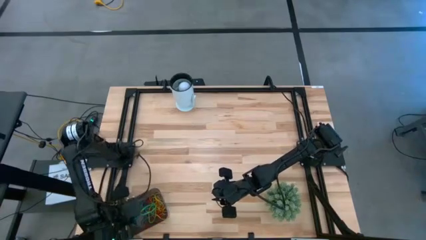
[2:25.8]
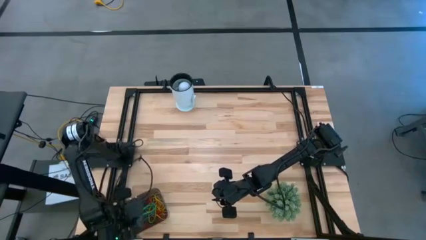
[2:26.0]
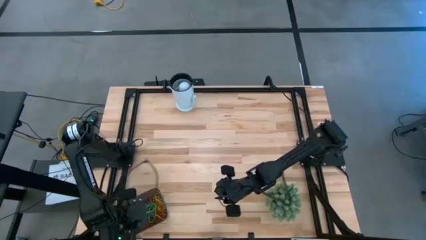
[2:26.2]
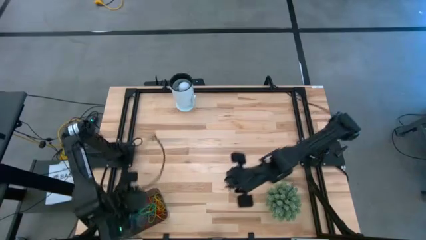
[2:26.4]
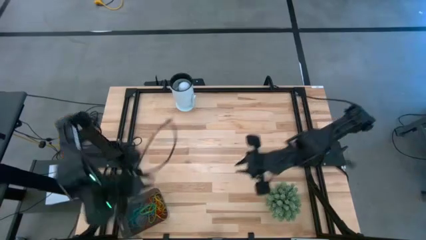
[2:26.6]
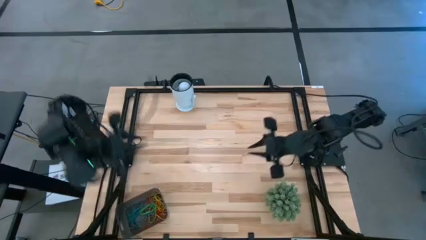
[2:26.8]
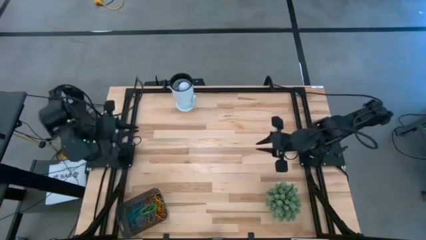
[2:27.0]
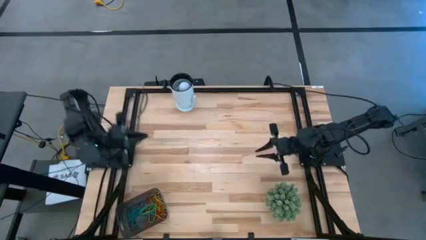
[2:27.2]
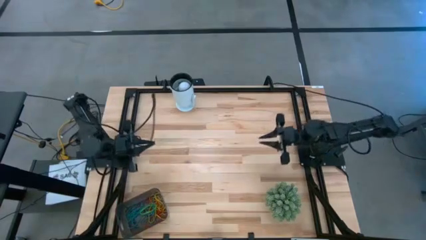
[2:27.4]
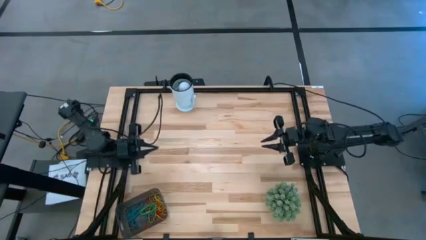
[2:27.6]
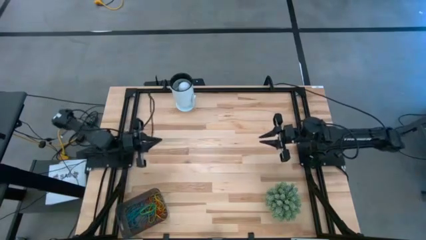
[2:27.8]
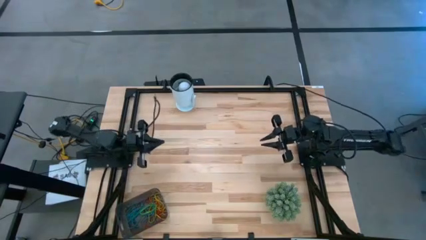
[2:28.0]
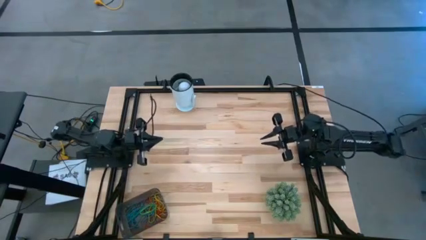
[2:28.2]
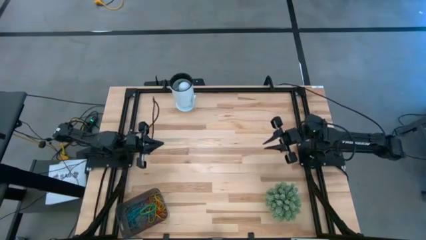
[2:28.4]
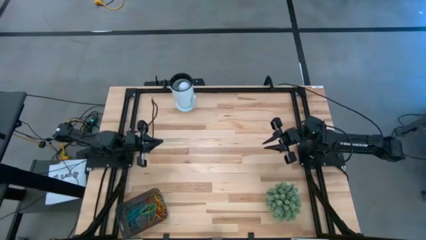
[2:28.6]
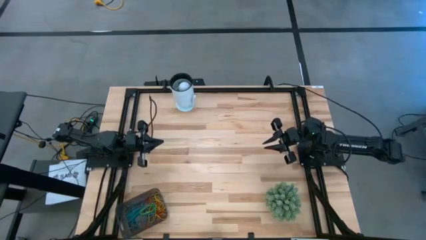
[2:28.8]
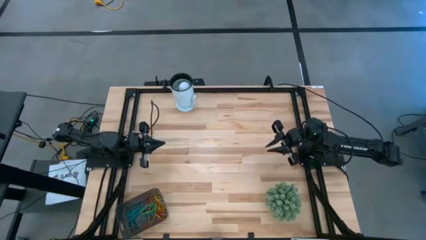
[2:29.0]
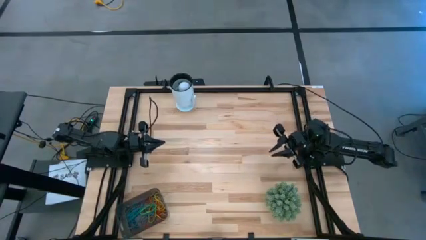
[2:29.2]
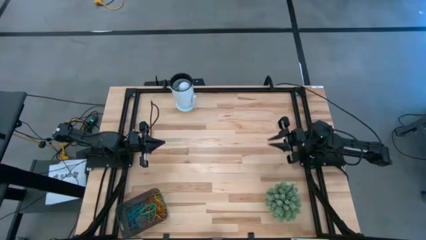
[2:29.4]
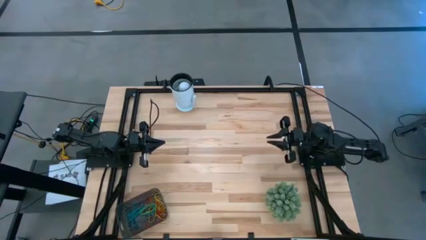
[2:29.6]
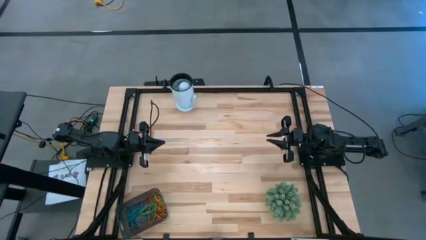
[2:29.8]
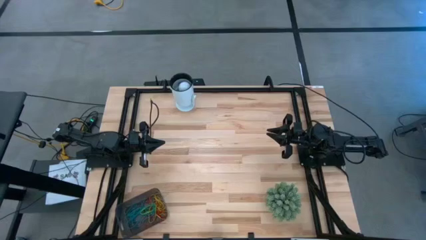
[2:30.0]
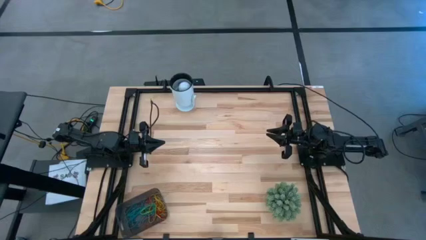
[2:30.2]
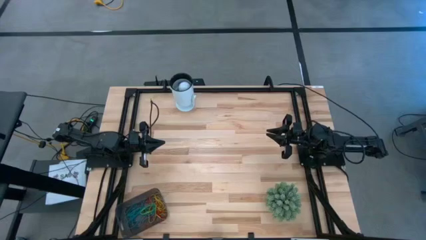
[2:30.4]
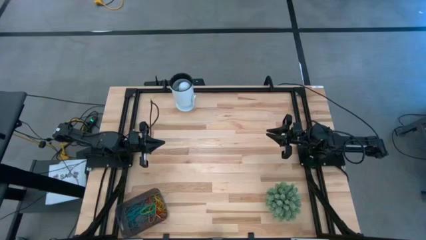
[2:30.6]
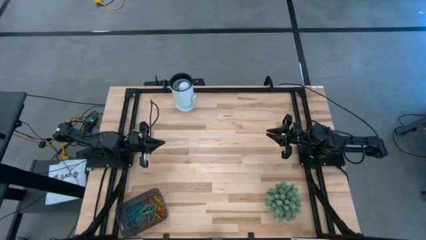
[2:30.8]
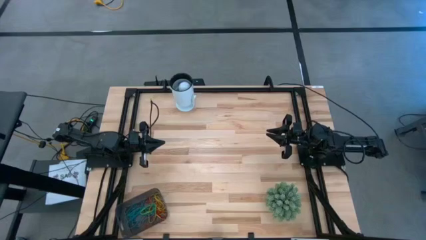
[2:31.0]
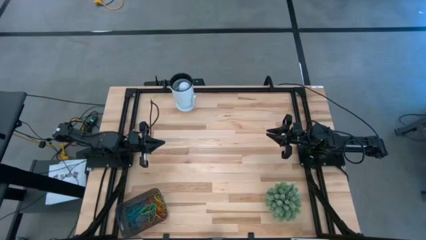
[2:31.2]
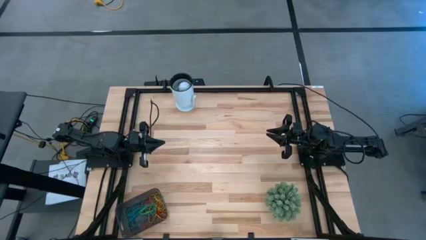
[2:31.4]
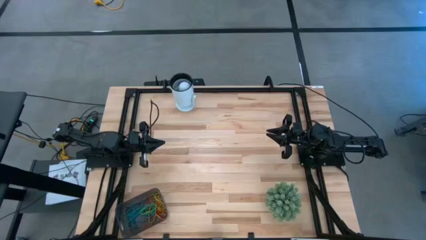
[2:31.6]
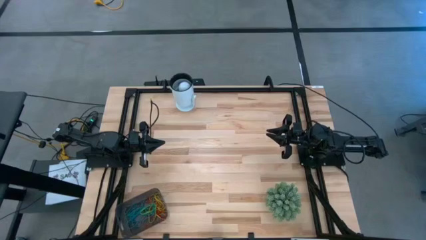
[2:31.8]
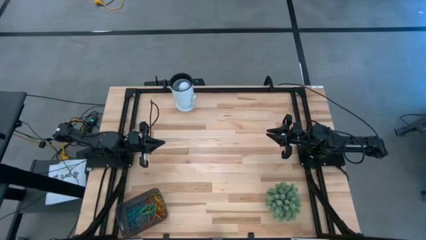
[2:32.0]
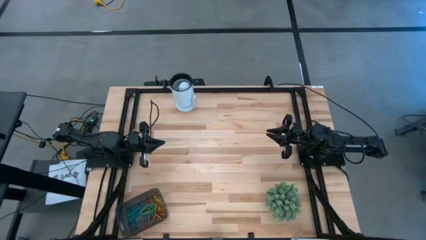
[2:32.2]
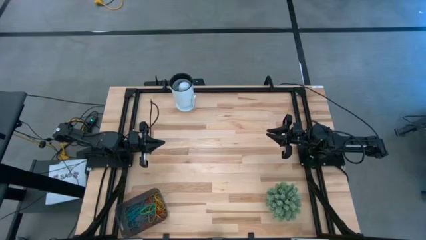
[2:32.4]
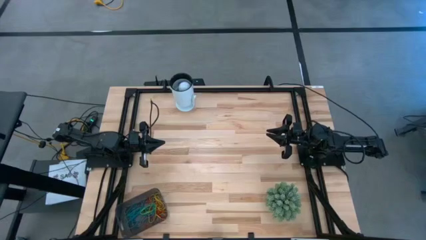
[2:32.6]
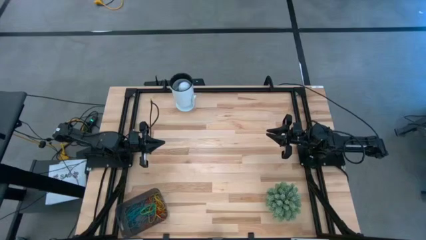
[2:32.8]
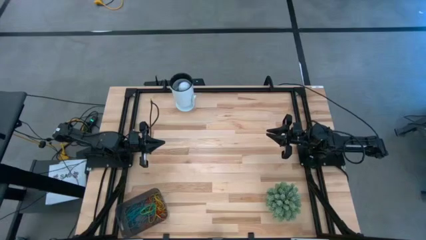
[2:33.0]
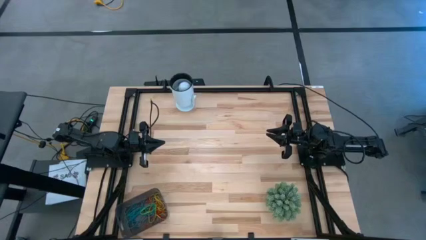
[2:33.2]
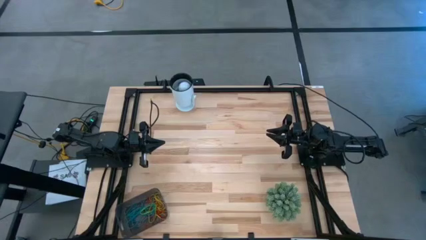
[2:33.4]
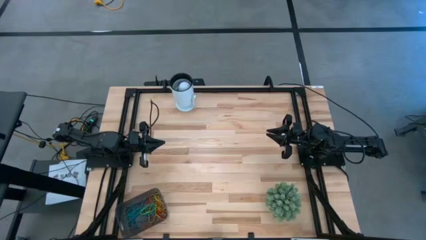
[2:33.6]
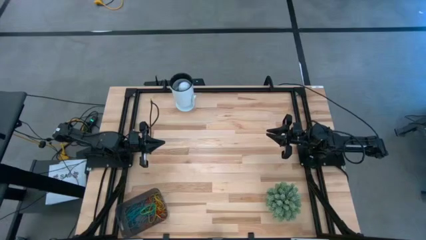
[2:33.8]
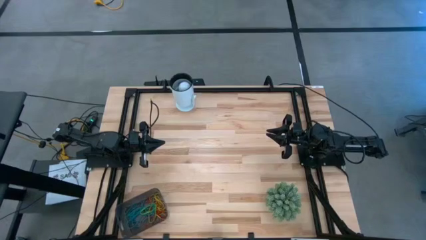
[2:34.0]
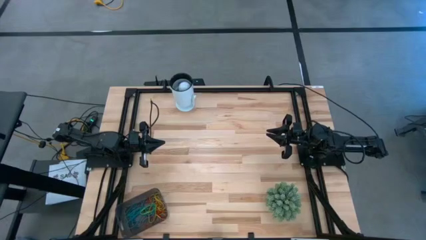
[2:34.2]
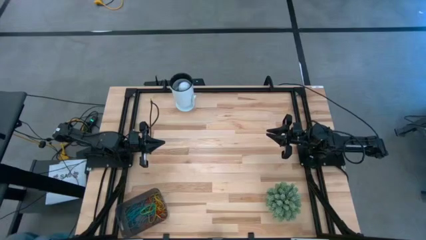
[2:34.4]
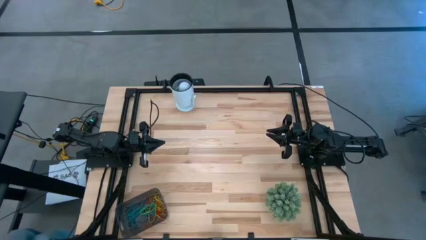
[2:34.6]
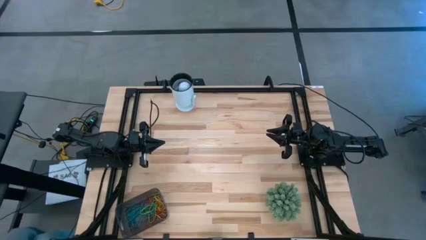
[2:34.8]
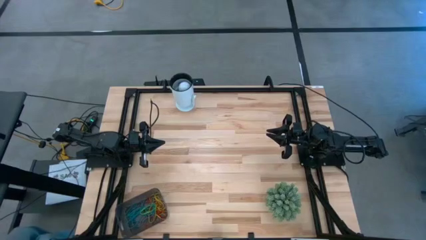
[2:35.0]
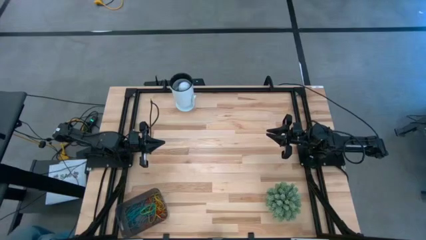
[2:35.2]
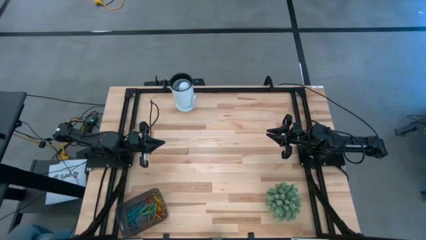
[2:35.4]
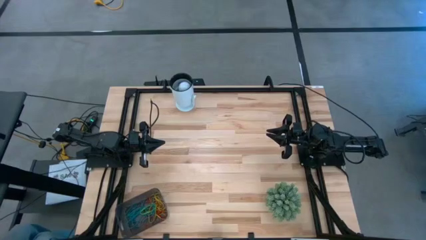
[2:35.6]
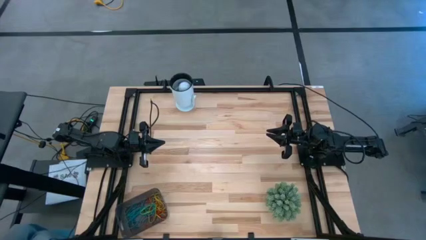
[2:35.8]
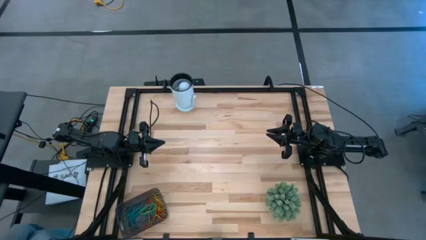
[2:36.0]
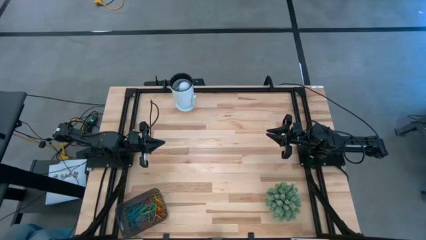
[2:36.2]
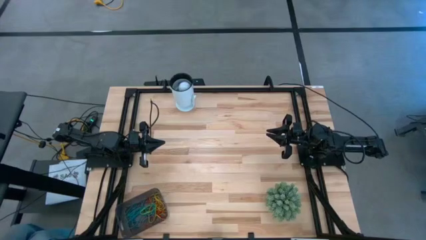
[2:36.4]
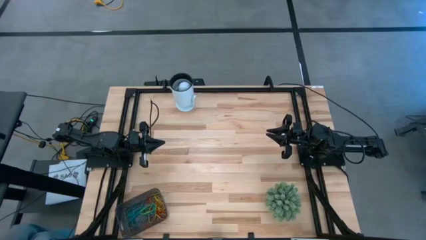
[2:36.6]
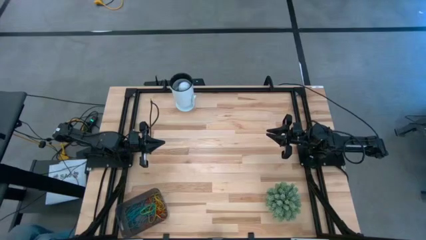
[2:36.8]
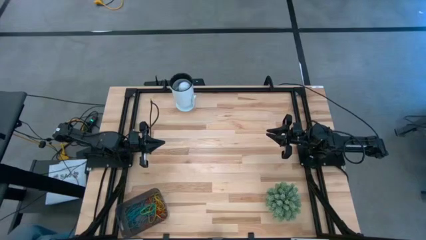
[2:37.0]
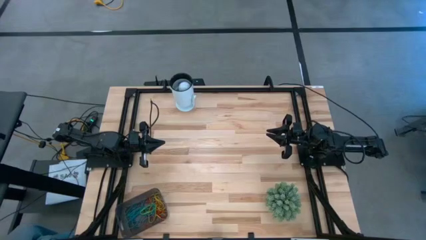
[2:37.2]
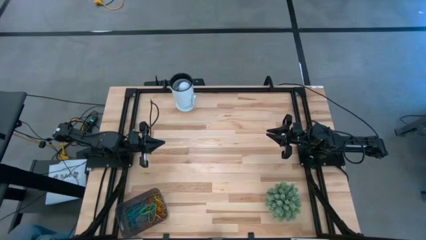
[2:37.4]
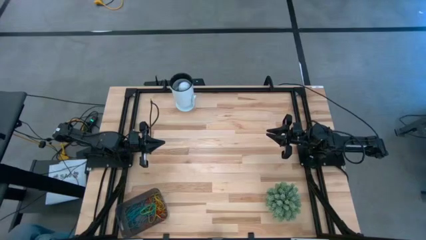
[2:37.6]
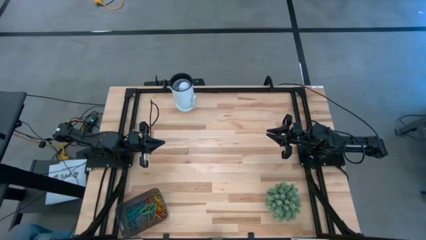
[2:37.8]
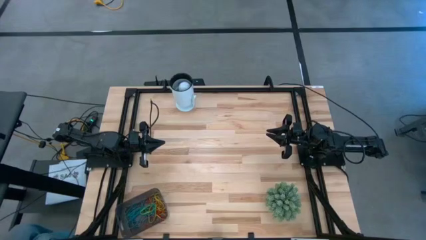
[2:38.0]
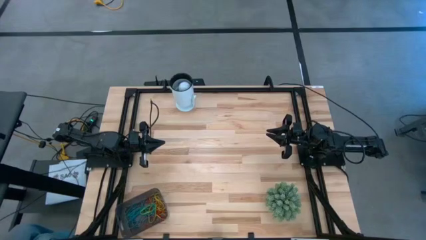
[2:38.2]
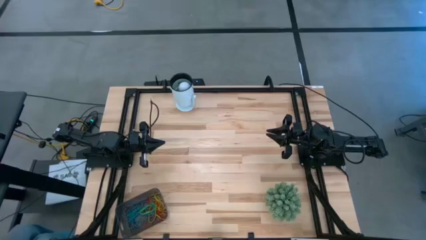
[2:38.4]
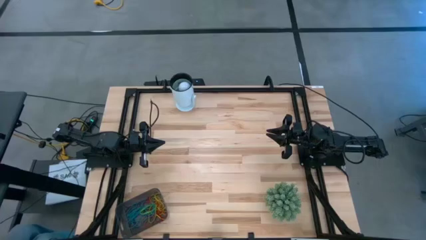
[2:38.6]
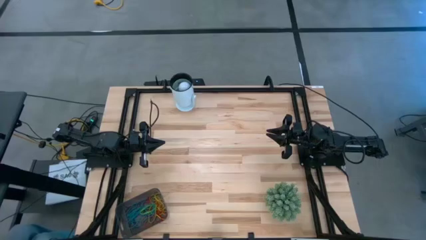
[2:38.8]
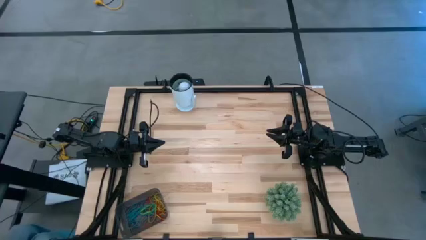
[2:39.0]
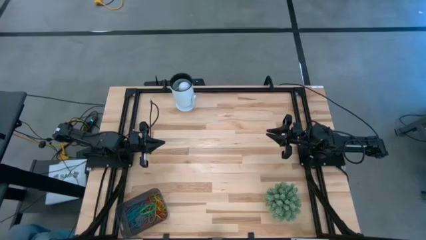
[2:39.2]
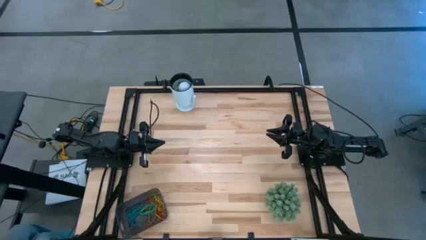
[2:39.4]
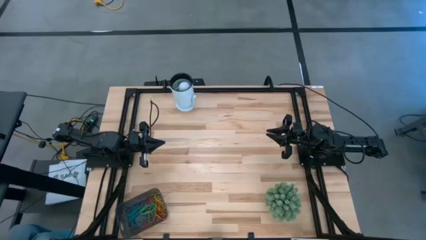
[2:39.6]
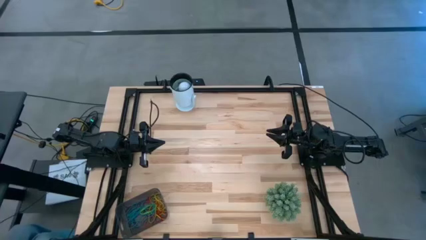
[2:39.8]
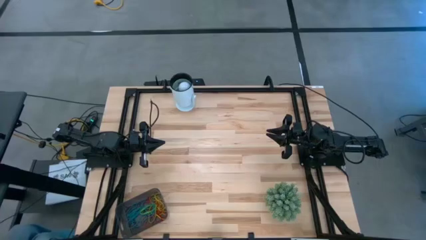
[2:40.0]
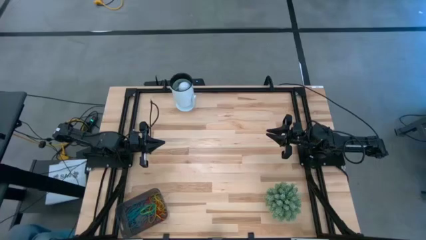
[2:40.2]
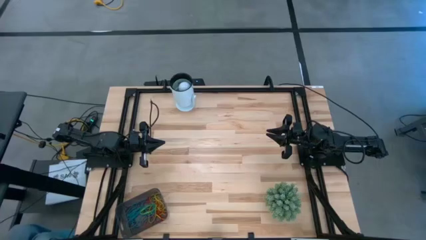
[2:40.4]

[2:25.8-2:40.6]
Task: Pick and place items into bin
Return to Home Position

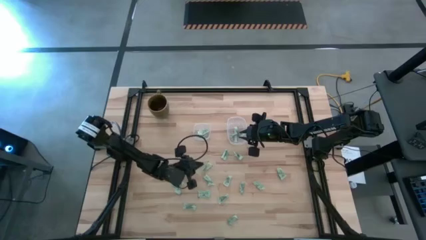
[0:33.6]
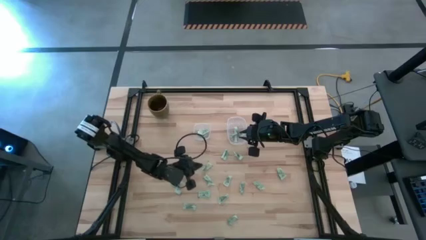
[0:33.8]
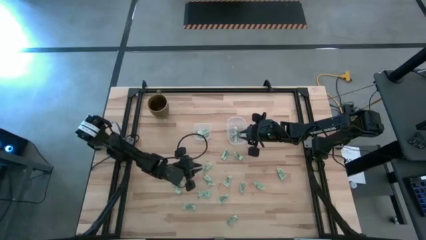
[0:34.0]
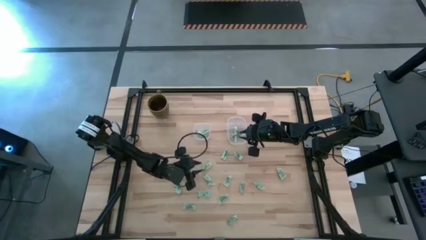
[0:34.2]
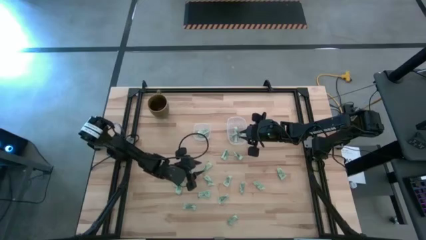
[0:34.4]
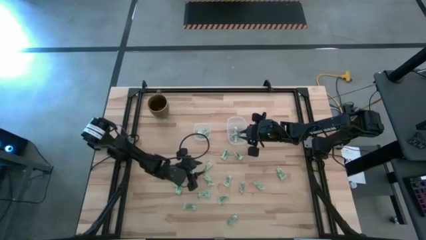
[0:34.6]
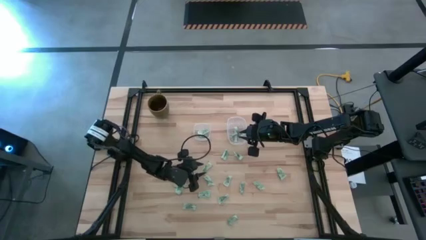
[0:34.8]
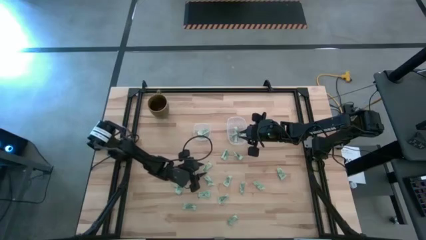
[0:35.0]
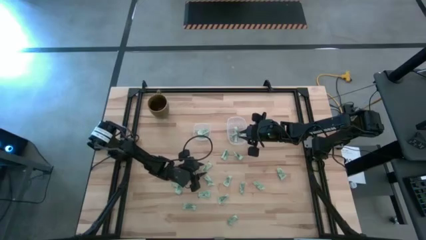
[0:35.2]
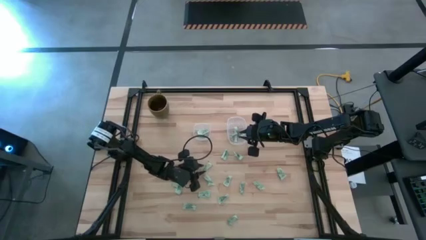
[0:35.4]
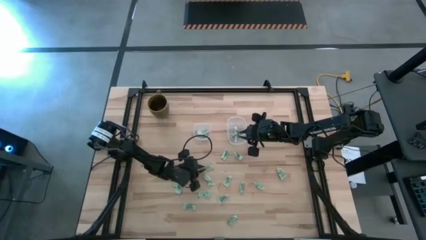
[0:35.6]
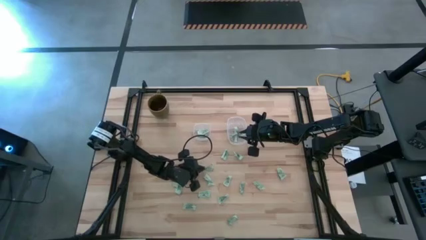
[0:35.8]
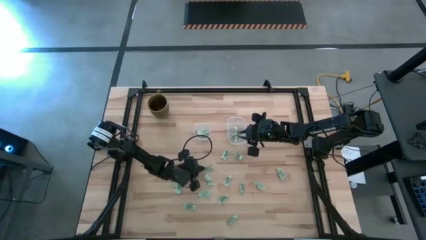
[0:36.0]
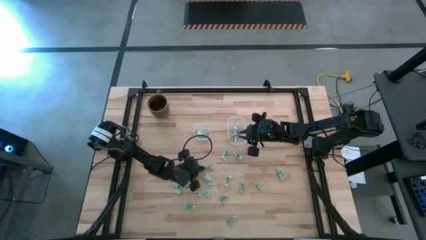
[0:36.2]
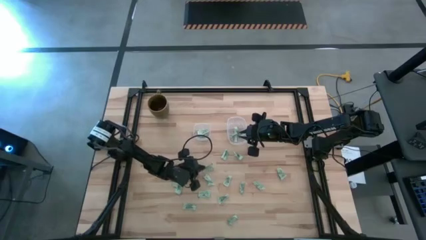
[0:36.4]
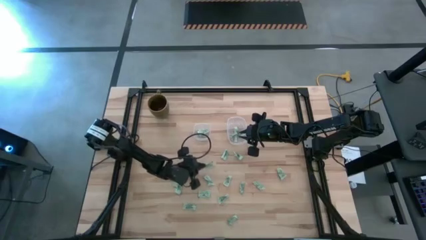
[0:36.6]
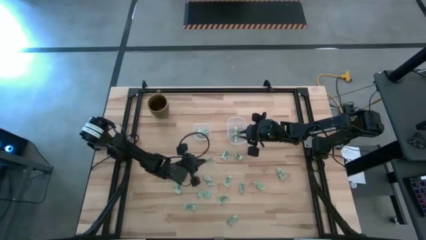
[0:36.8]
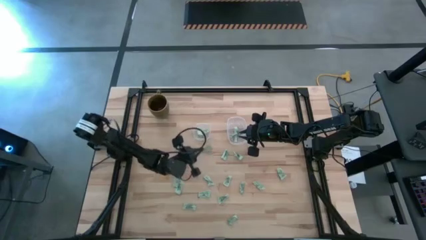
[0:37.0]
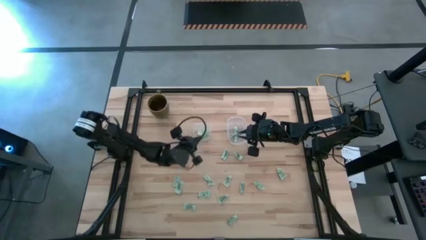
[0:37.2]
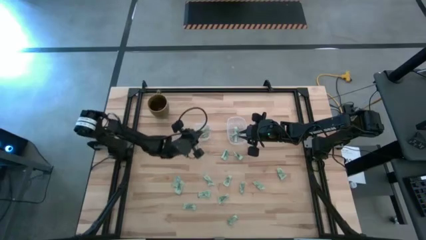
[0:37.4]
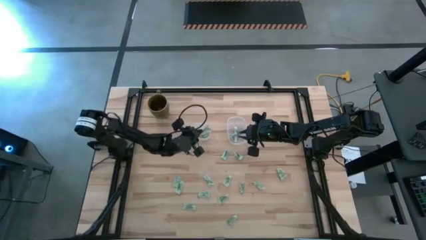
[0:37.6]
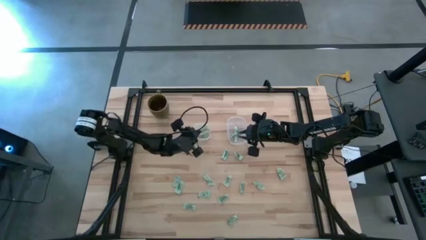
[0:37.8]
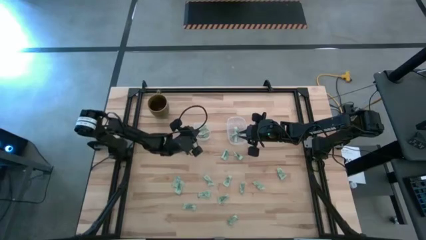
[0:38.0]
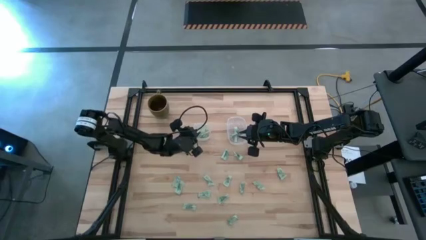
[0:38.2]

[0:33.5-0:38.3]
Task: Pick and place items into bin
Put the light green stevia packet into the left transparent bin
